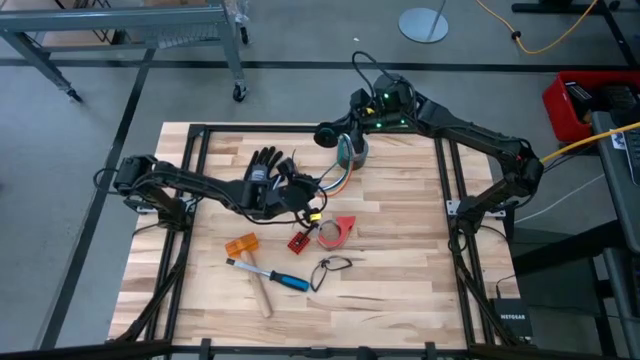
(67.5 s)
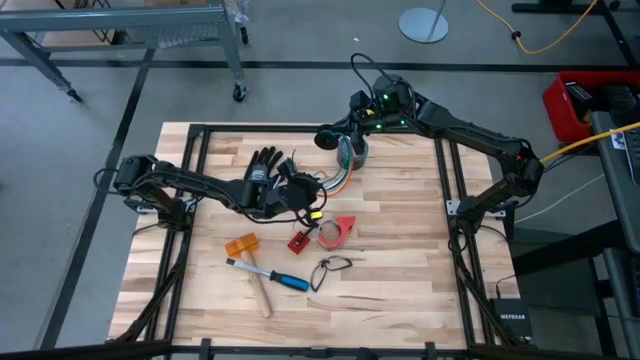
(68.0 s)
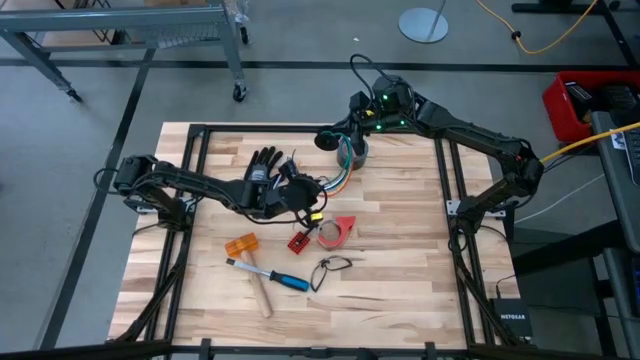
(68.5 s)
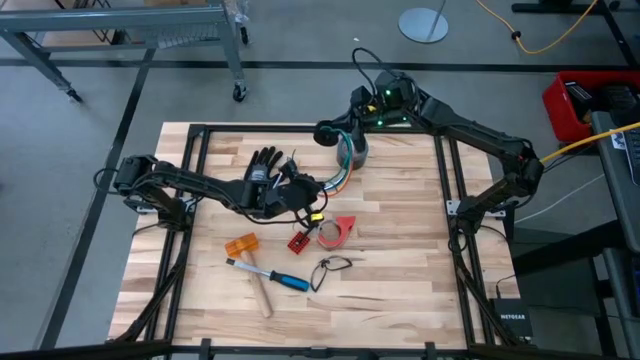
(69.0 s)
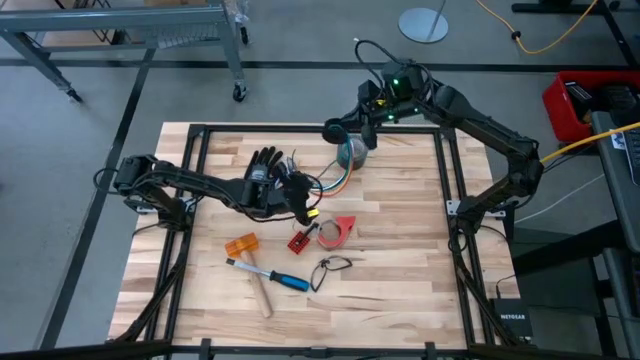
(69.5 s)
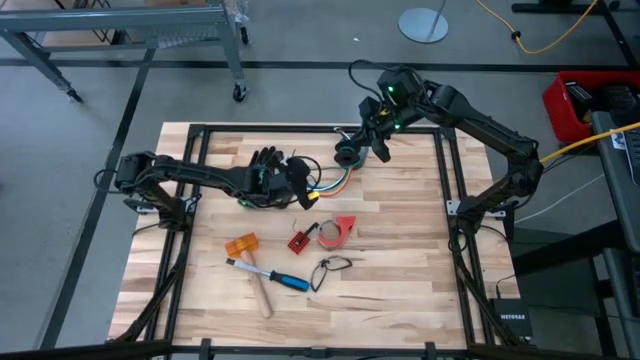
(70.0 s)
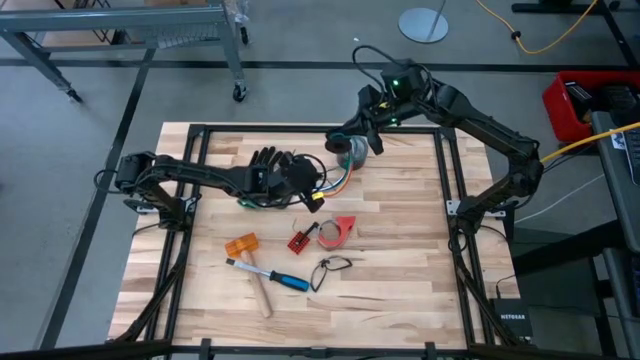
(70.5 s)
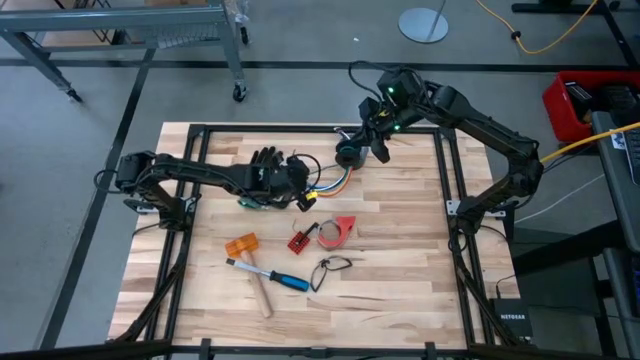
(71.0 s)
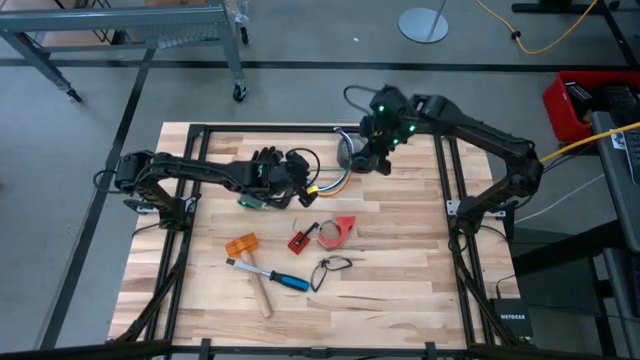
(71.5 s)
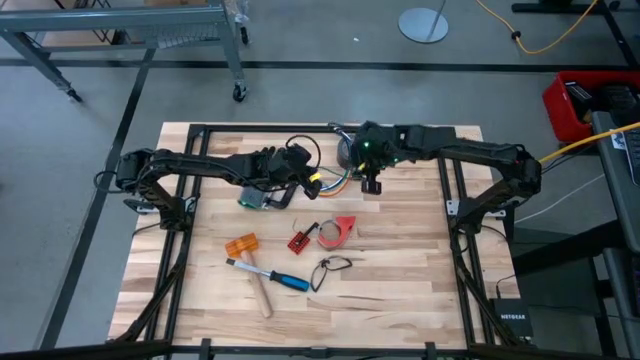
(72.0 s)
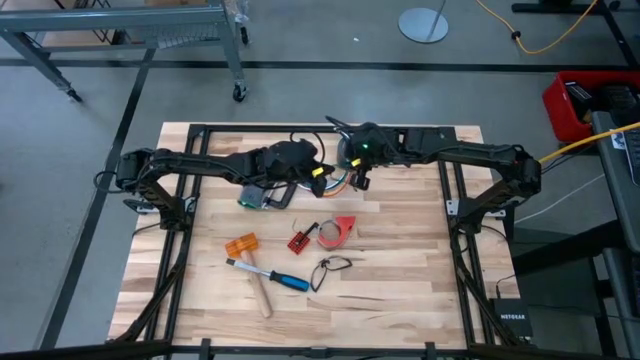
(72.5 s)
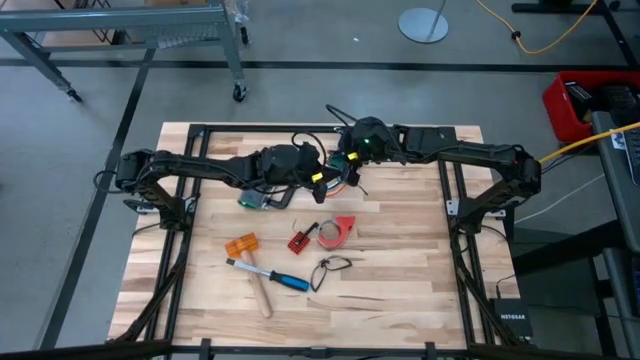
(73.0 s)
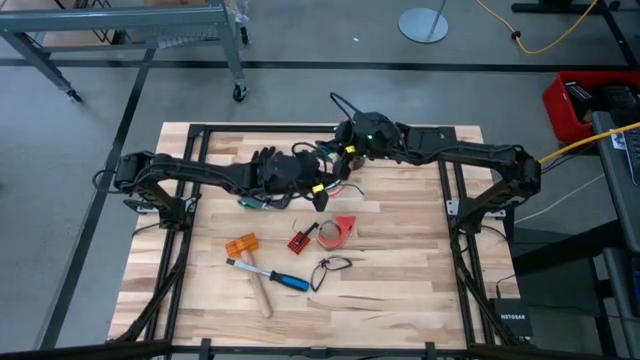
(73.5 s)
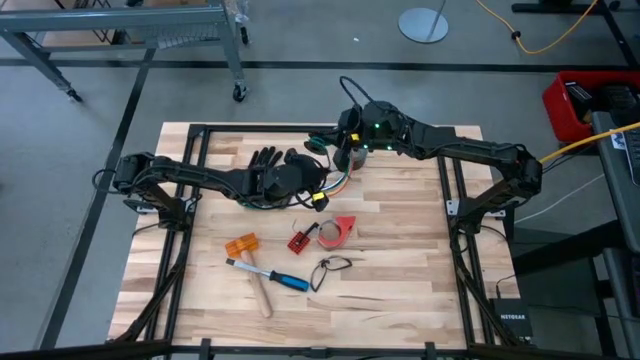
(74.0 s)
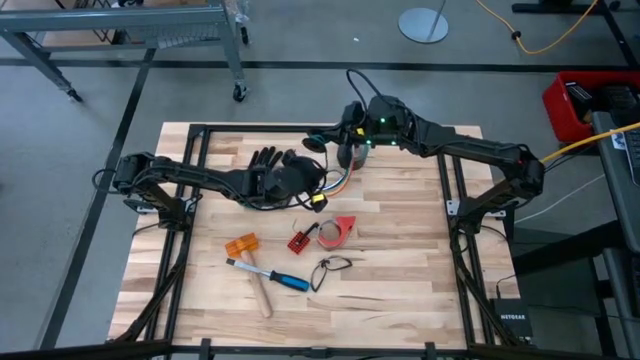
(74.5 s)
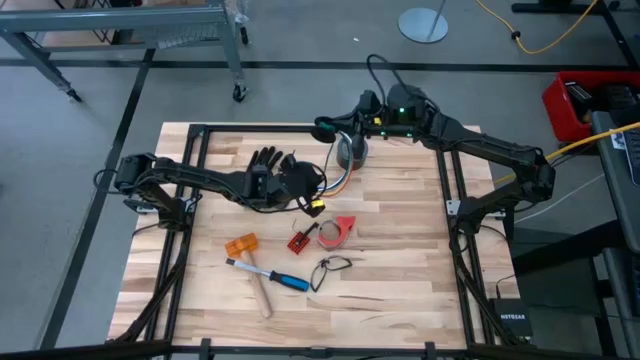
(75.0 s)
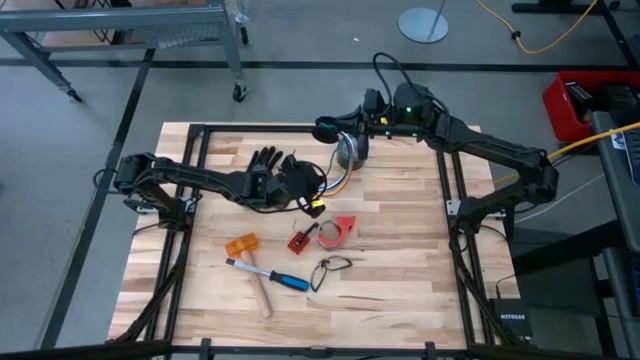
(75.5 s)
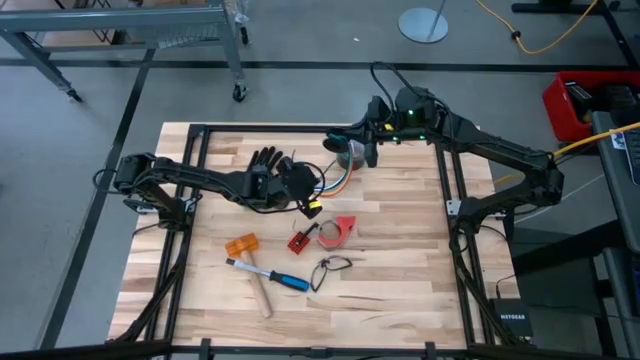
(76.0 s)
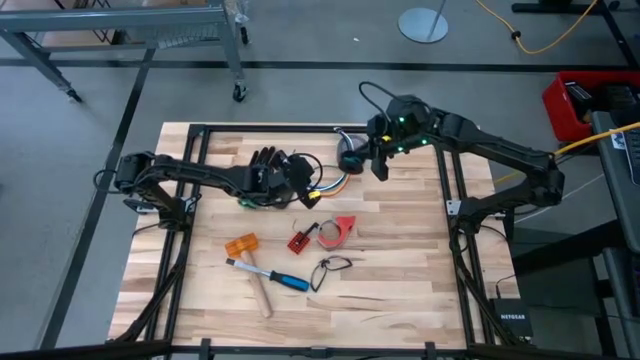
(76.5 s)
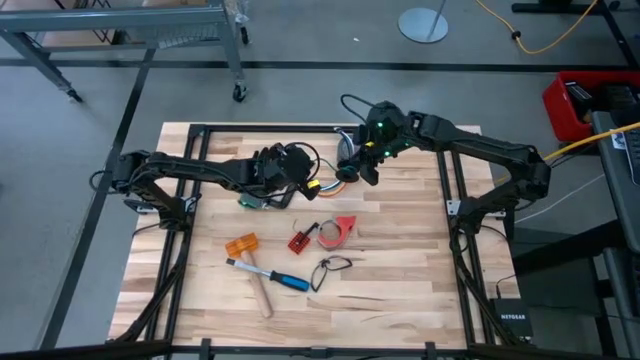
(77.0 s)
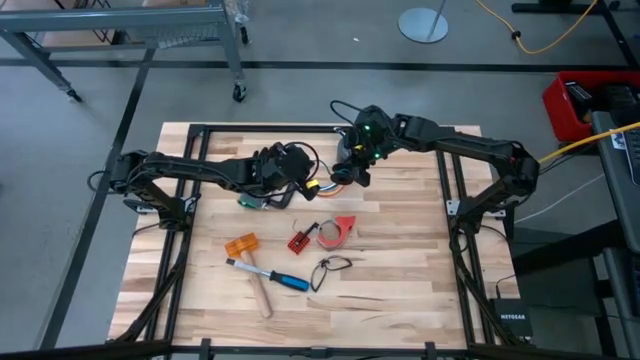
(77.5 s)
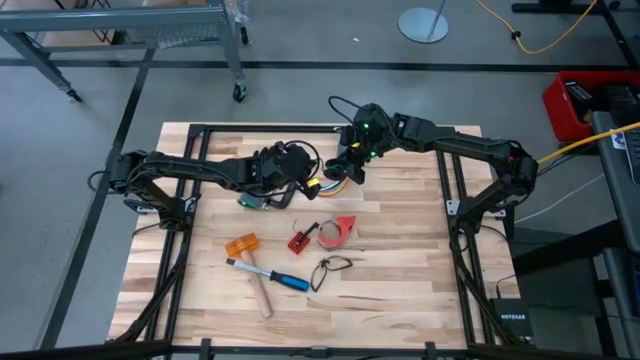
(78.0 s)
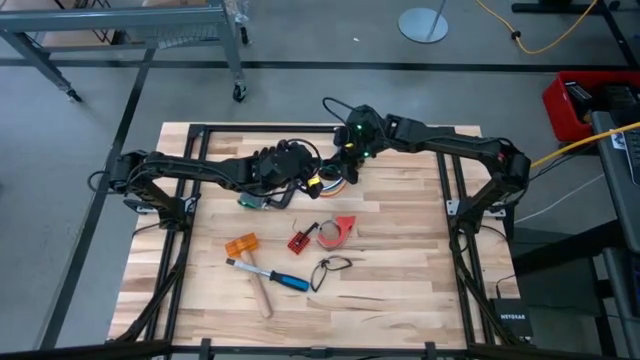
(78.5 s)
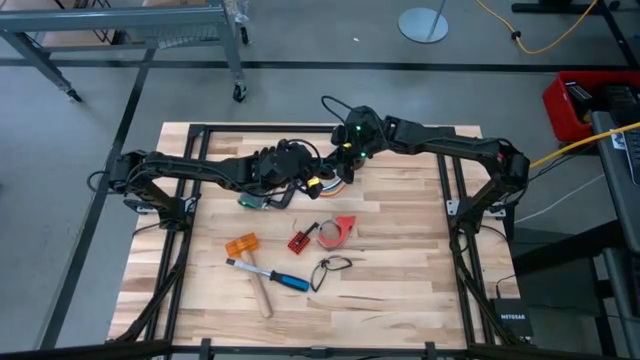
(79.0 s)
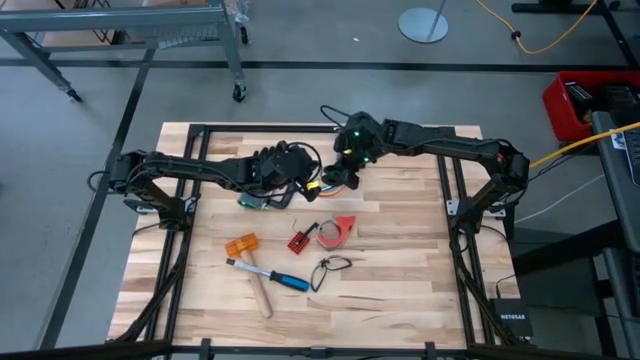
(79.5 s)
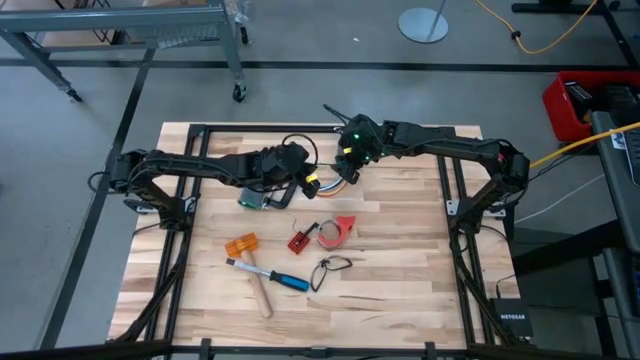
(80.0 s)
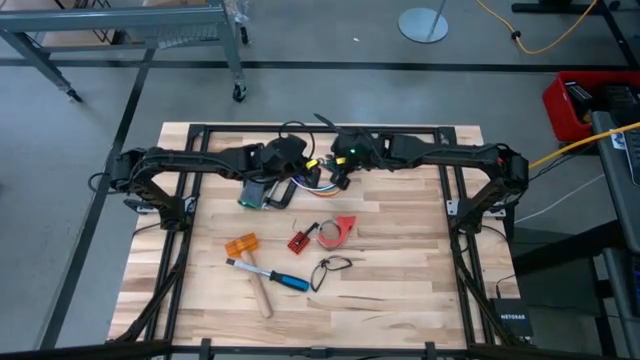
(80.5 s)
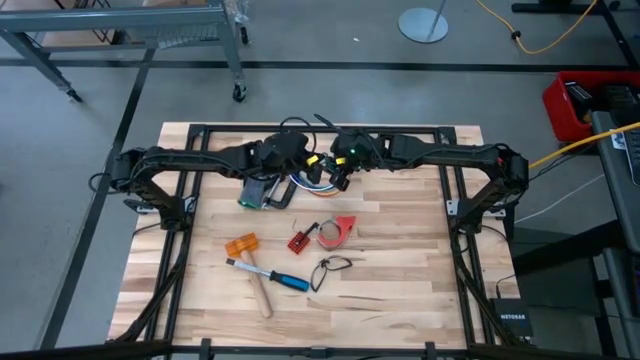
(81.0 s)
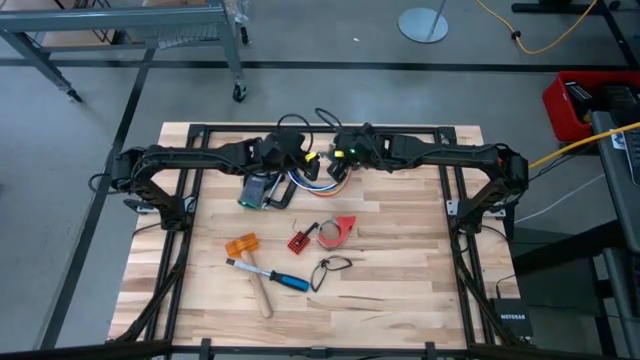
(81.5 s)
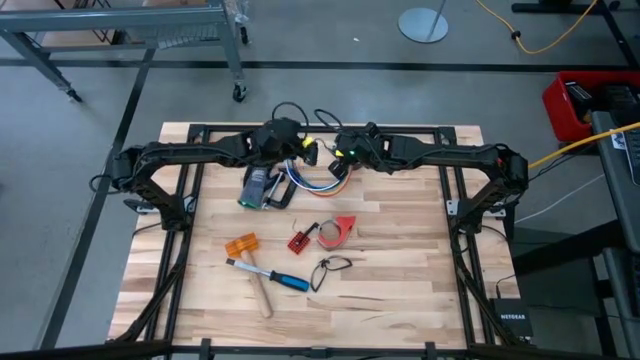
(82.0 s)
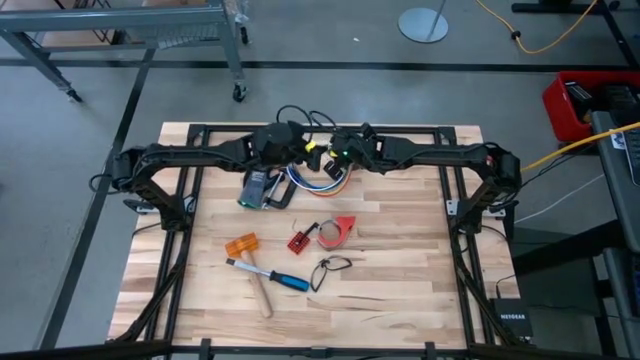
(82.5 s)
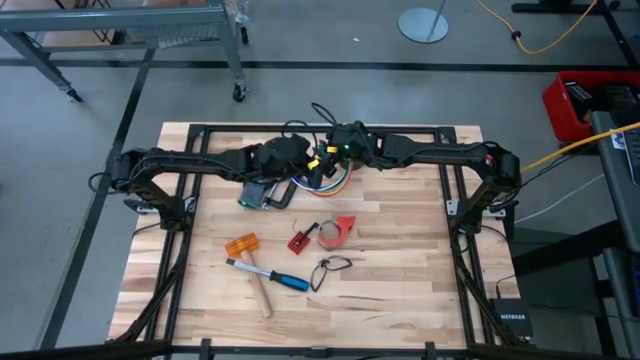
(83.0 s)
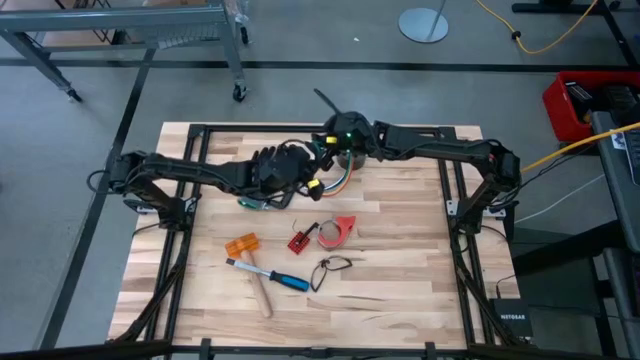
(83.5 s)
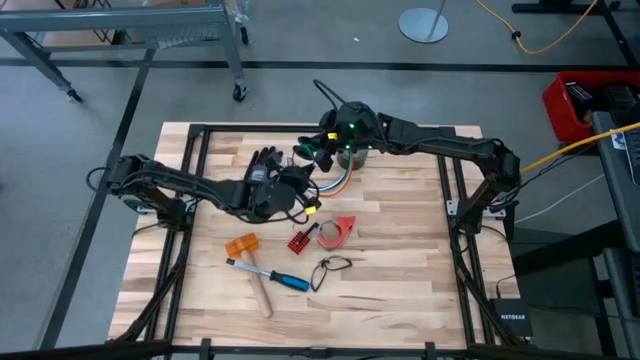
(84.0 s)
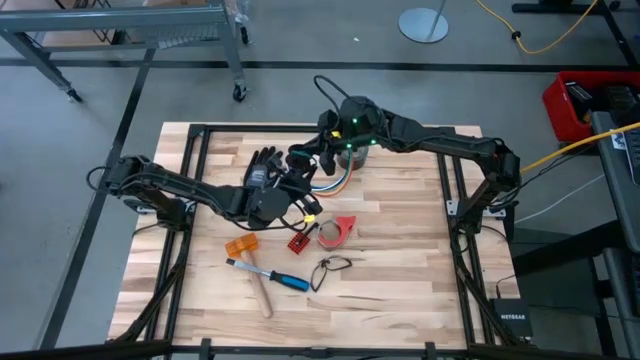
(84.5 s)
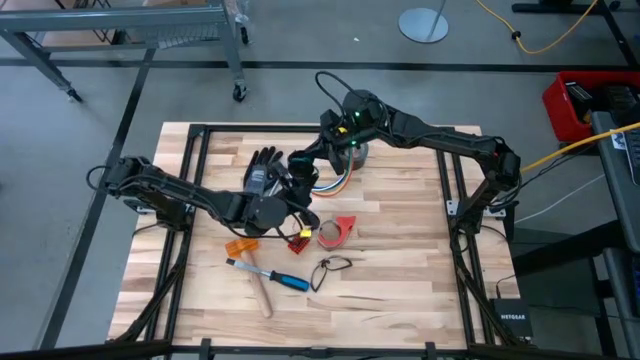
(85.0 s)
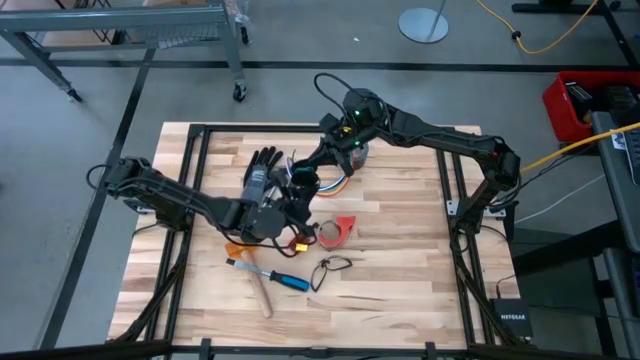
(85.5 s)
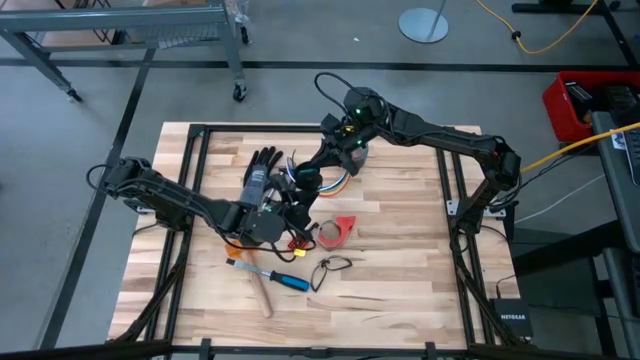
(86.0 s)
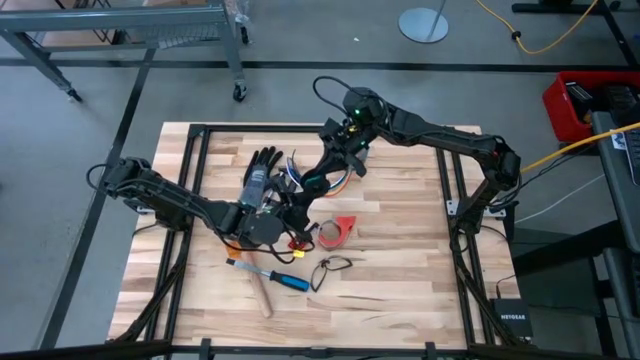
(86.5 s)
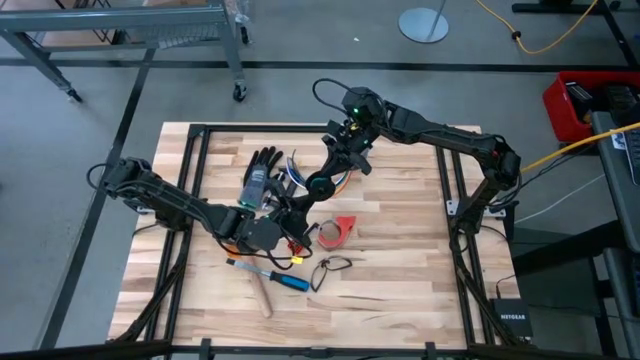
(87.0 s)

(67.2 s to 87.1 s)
Task: Coil cords
Coil the wire onto the spool
